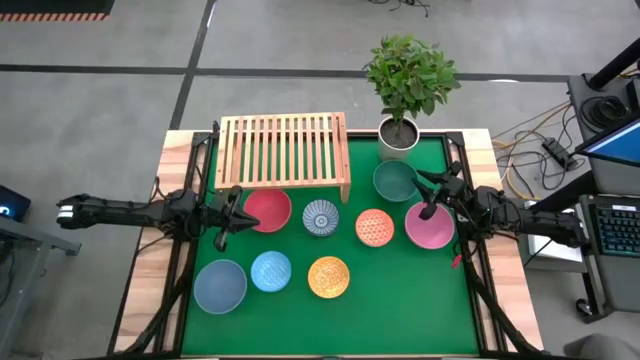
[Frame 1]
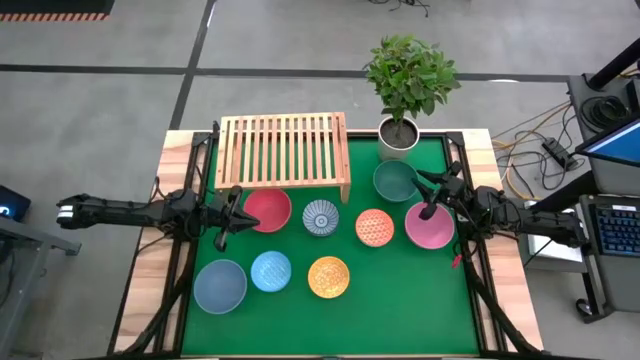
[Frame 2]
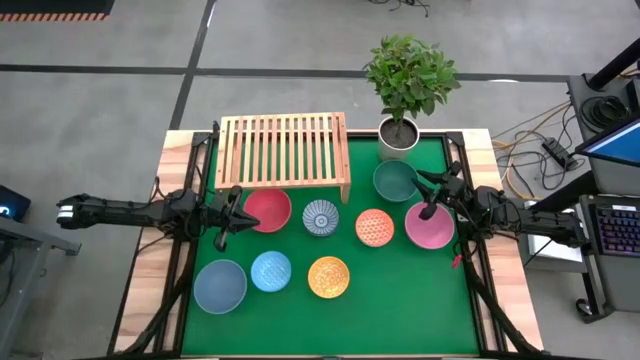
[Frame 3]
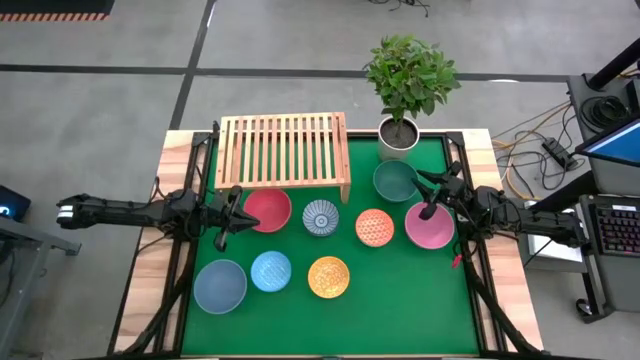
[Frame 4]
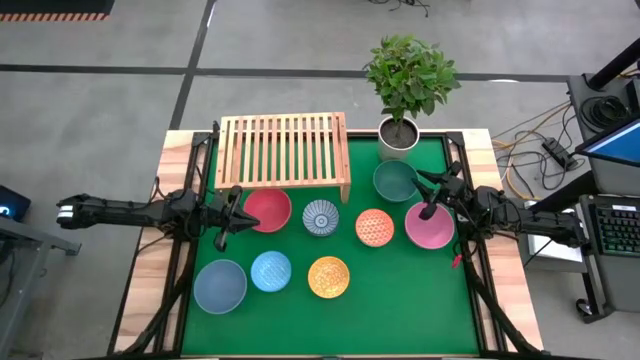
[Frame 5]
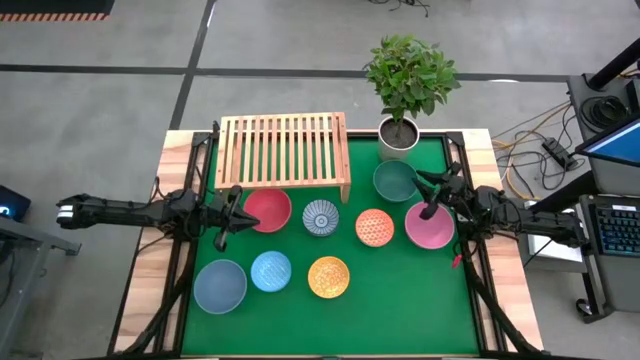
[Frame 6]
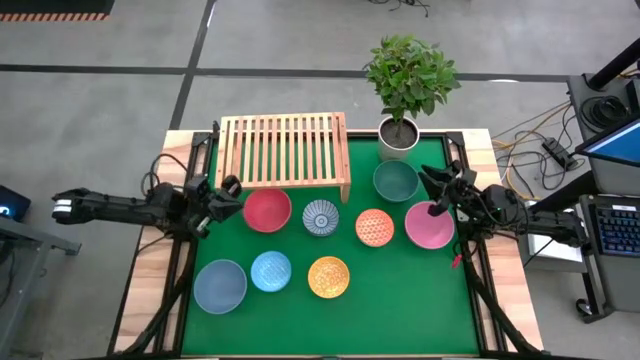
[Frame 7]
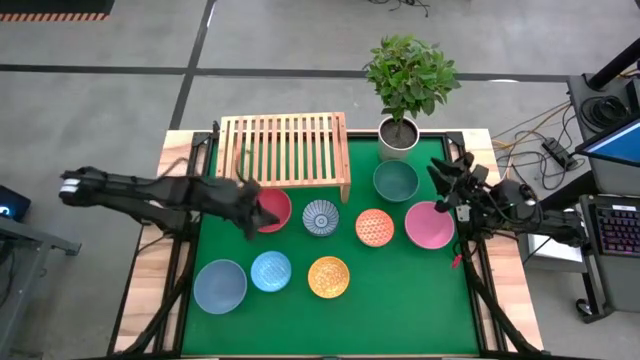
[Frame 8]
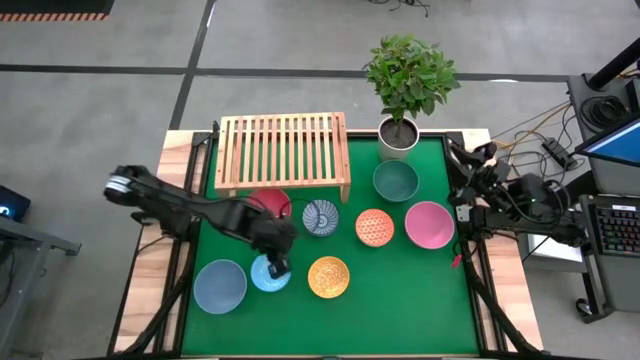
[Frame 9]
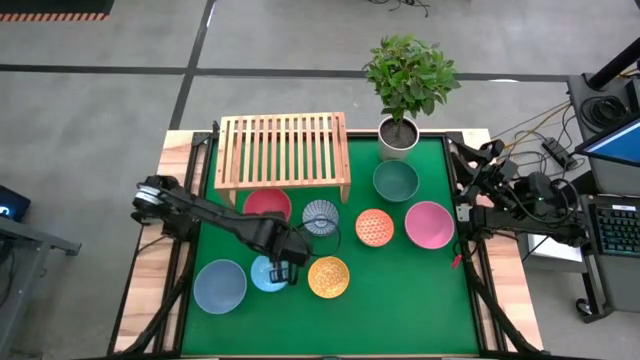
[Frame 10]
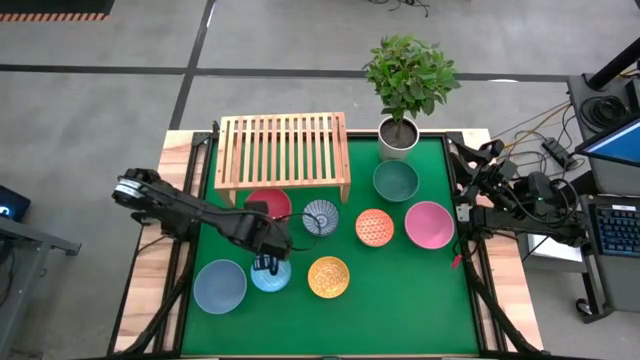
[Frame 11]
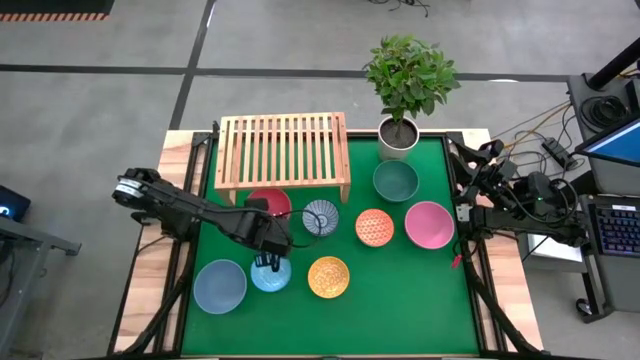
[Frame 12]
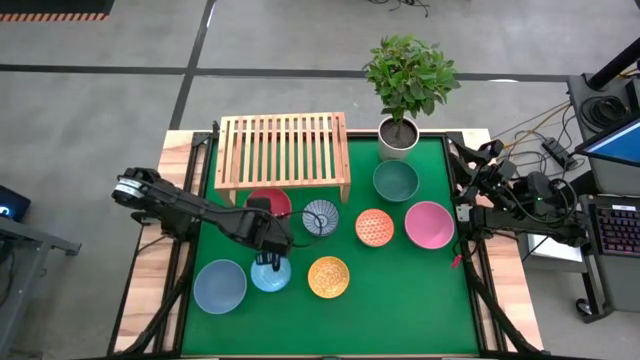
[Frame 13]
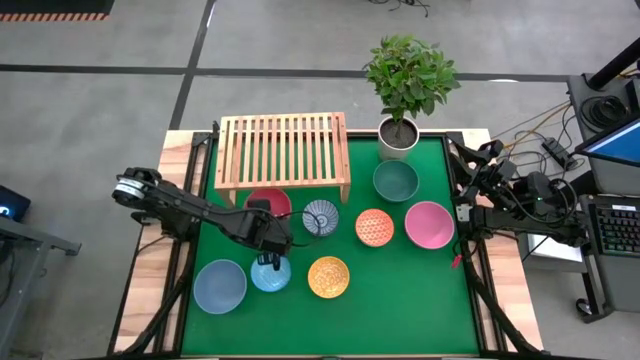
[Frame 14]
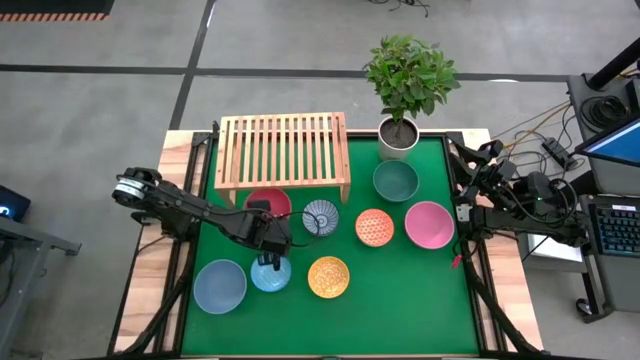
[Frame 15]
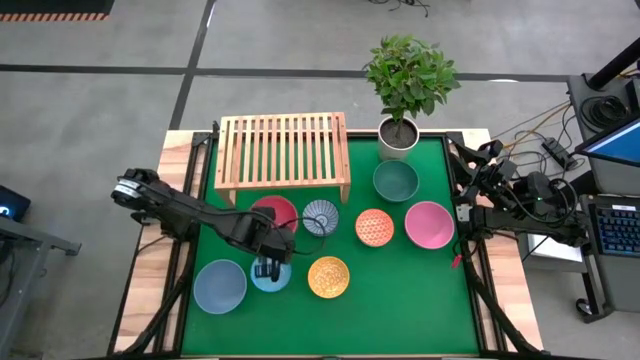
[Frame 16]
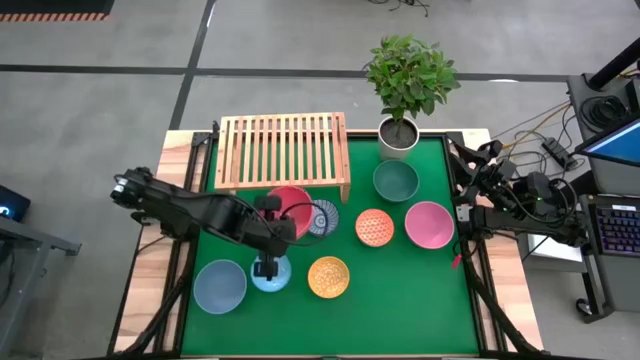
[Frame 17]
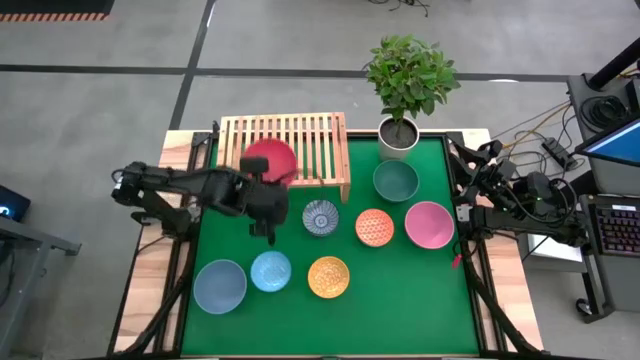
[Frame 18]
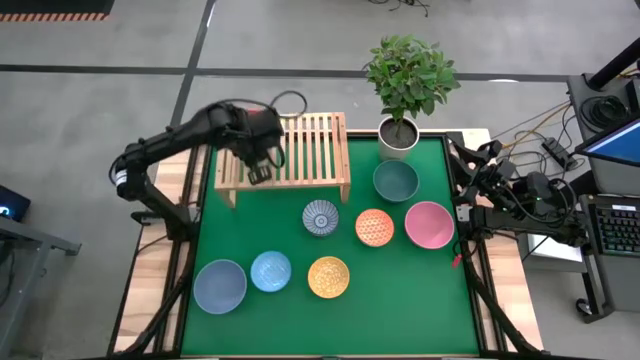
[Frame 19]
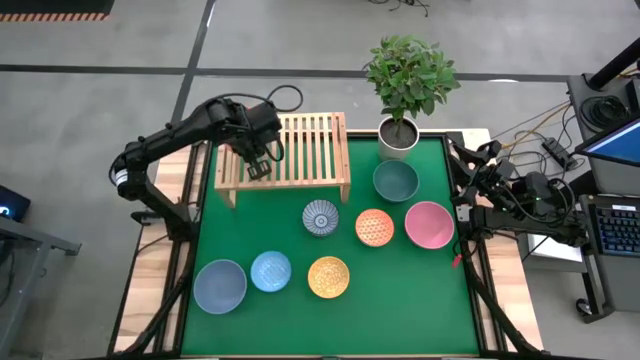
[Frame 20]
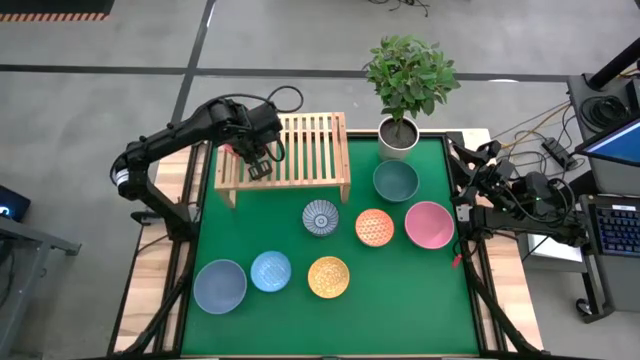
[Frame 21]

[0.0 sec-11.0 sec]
Task: Place and stack bowls onto a shelf
Put the orange bowl on the shelf

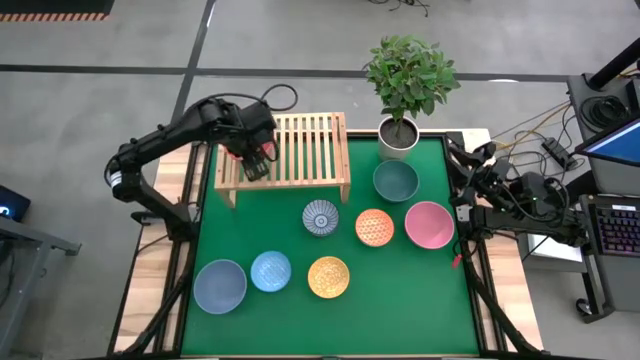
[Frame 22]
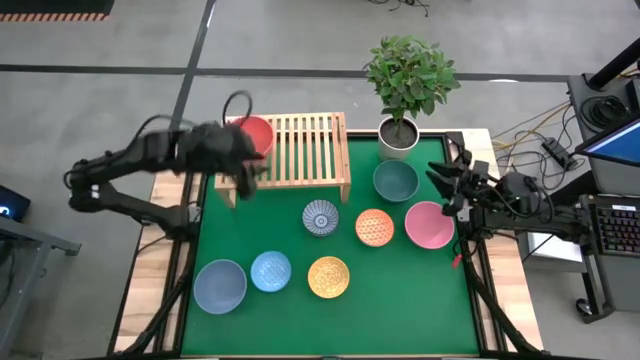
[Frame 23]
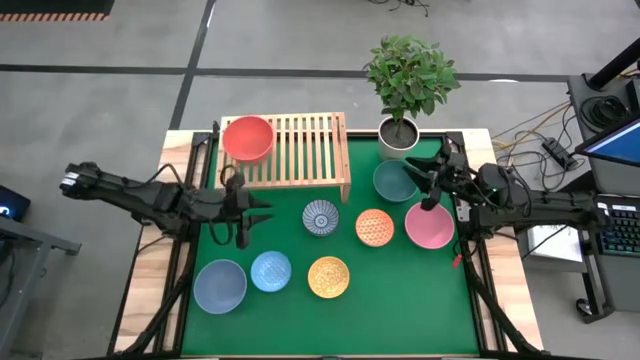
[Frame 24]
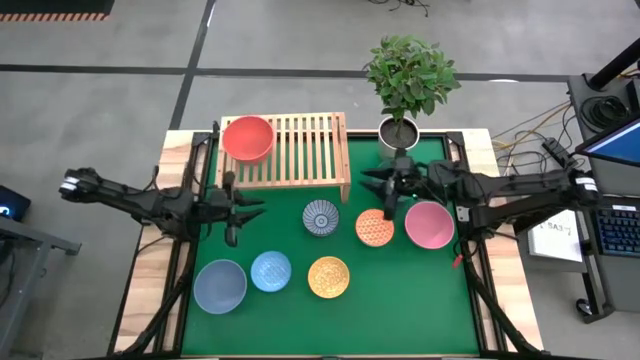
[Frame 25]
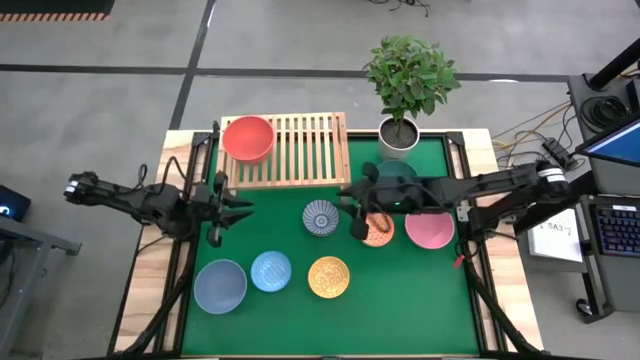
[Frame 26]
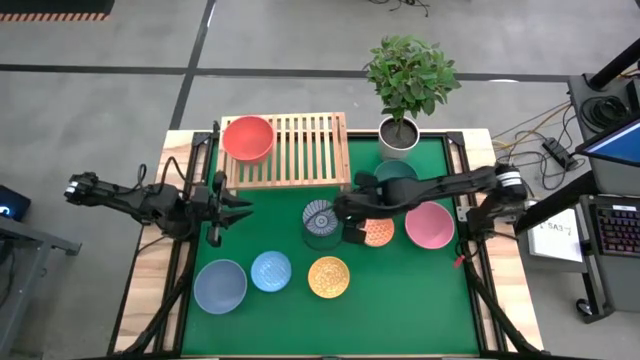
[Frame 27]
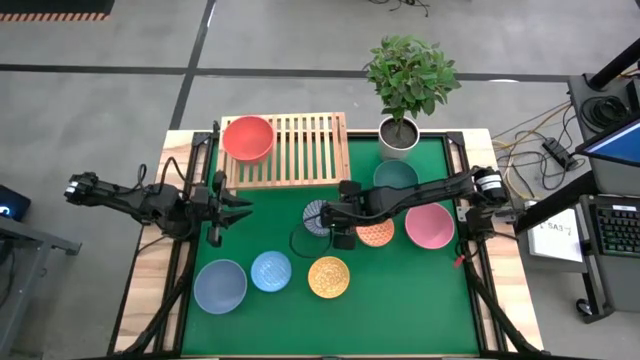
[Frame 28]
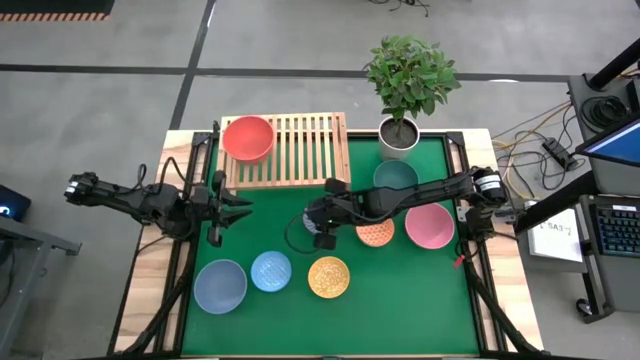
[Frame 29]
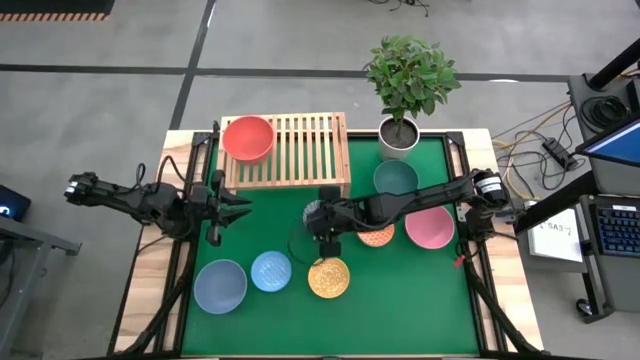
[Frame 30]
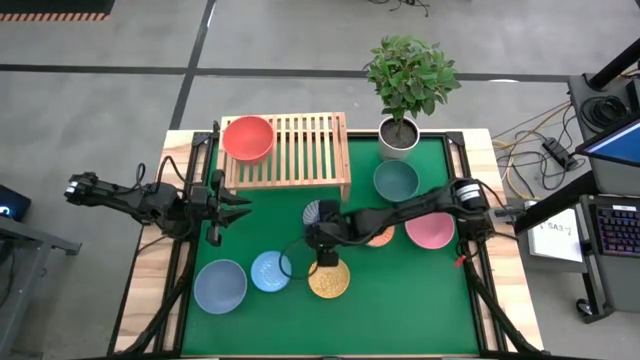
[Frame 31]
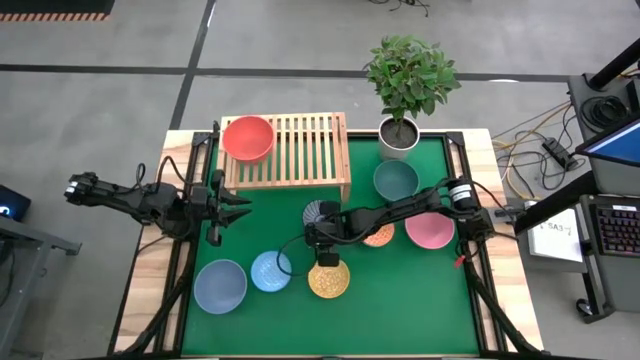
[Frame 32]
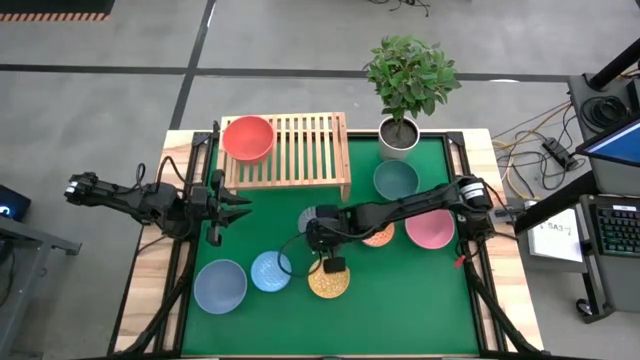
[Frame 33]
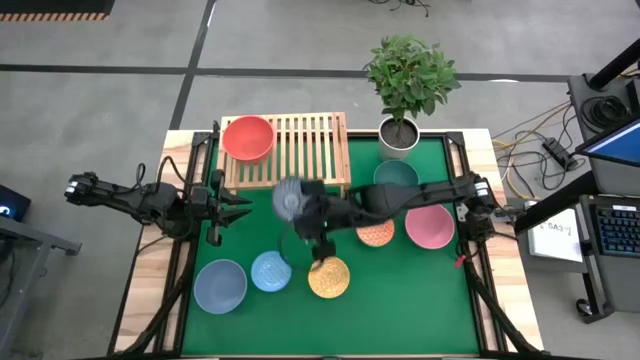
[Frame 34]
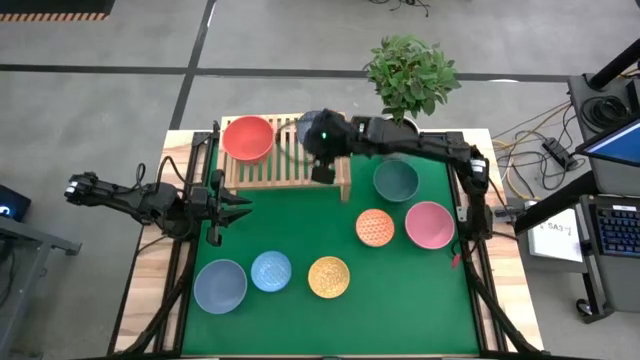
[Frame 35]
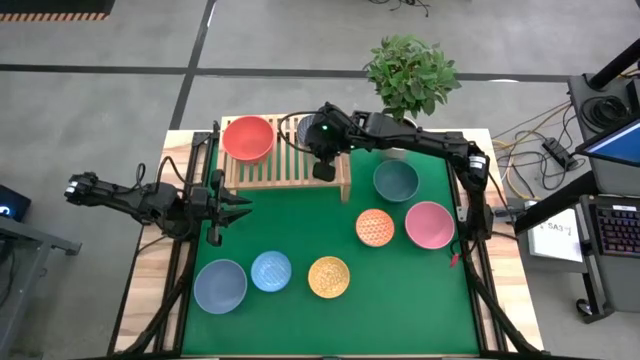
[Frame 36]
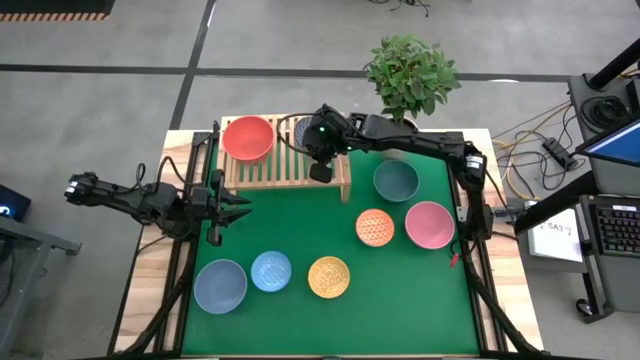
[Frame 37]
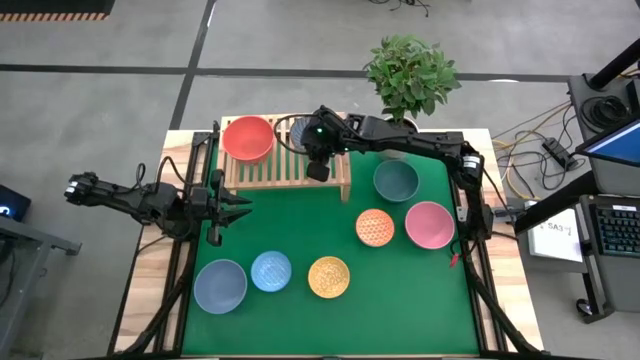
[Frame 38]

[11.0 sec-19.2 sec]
Put the blue and red patterned bowl on the shelf

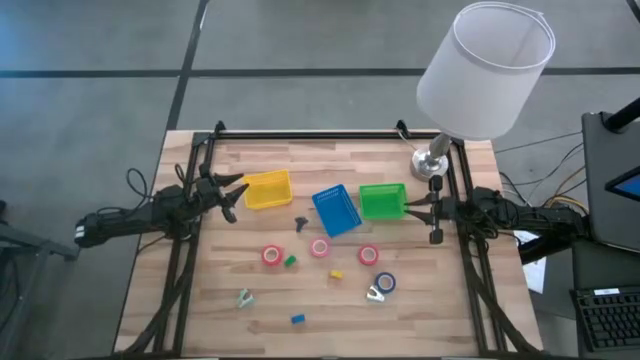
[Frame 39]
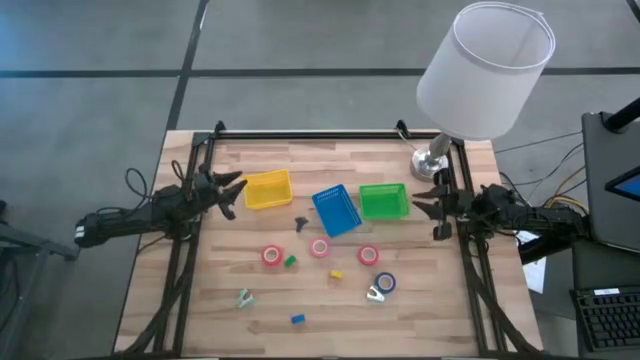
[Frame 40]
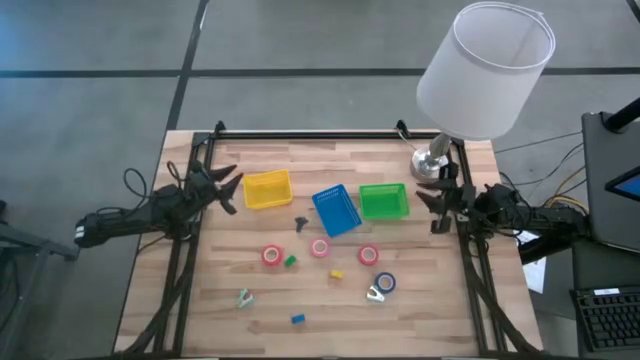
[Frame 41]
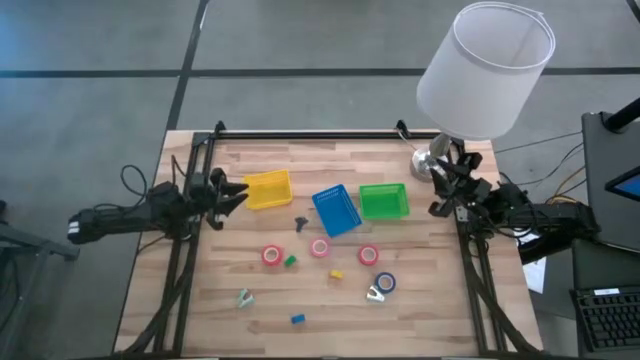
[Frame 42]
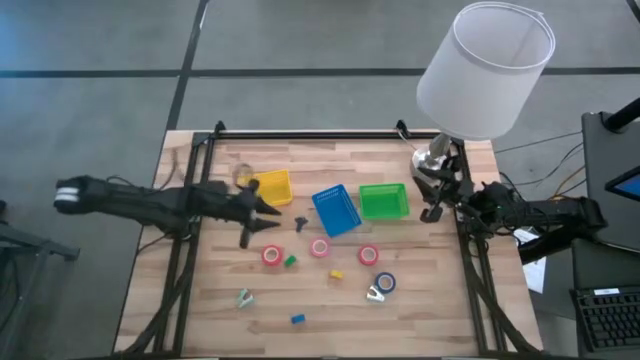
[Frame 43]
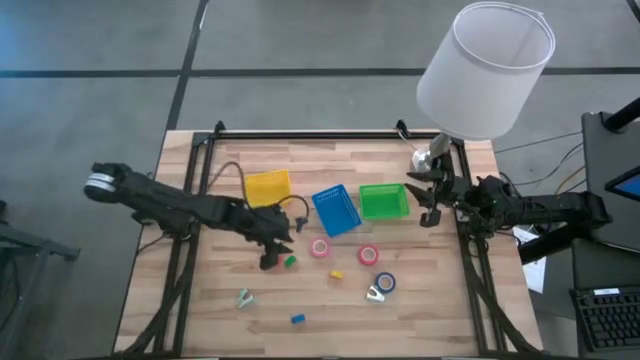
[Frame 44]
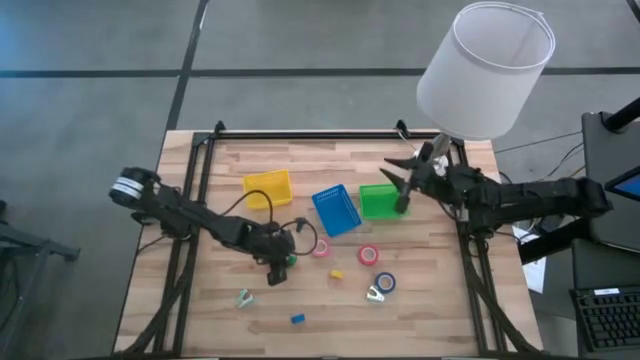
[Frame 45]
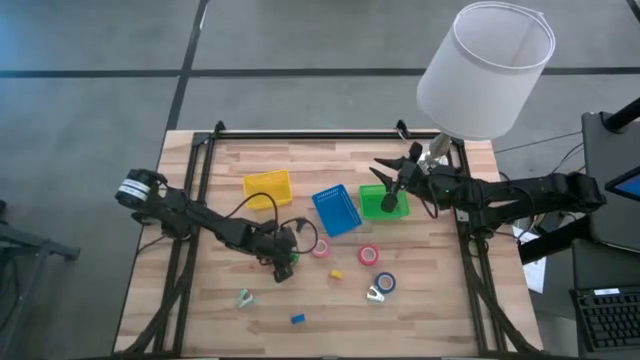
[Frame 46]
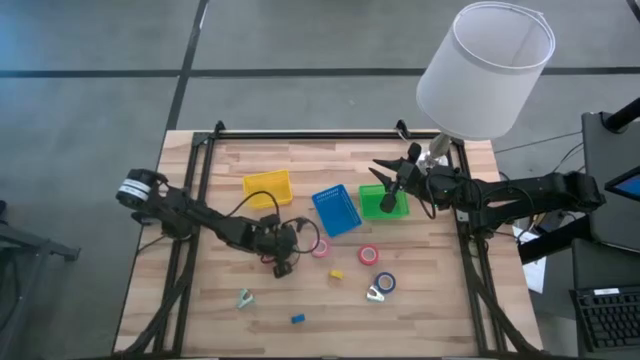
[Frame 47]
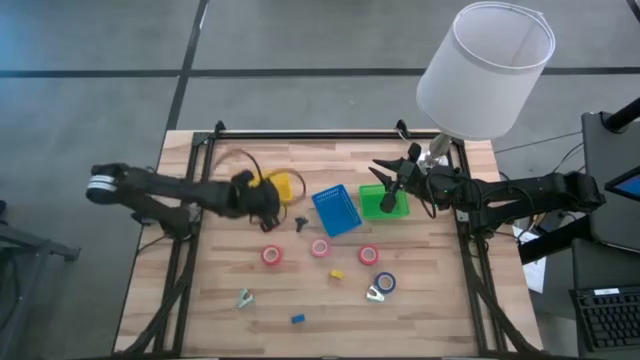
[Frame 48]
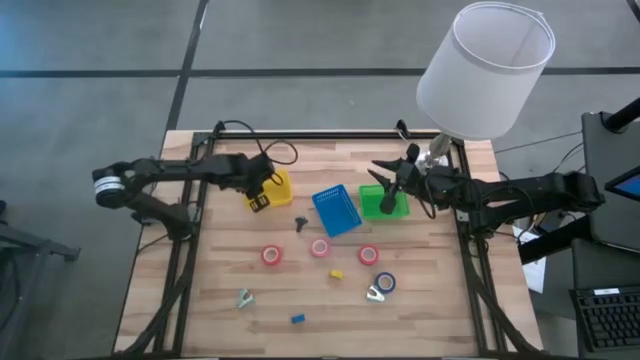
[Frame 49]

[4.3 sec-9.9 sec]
Task: Pick and place Stapler, Stapler remover, tape
Put the green stapler into the yellow basket
